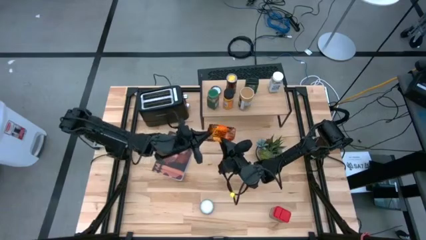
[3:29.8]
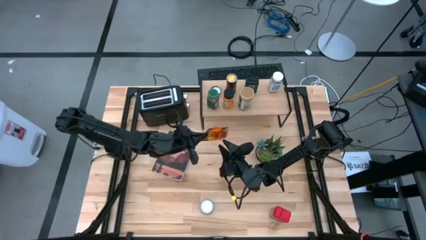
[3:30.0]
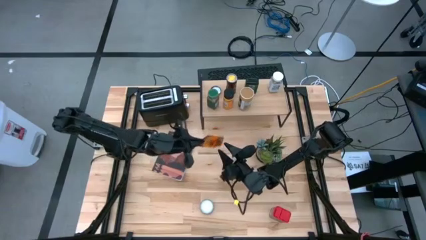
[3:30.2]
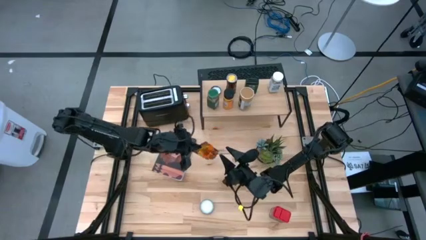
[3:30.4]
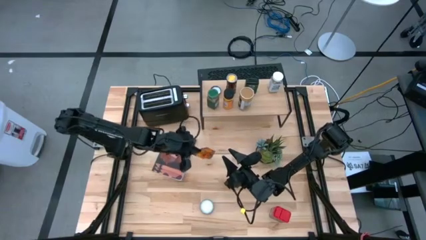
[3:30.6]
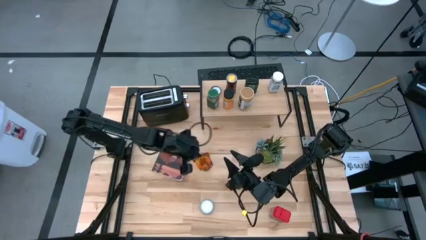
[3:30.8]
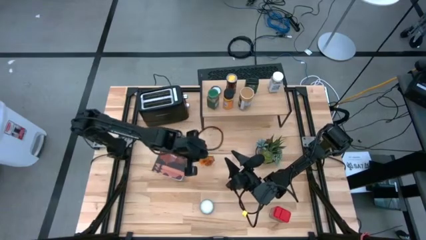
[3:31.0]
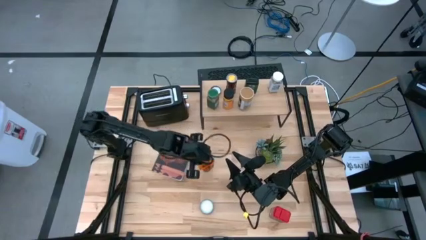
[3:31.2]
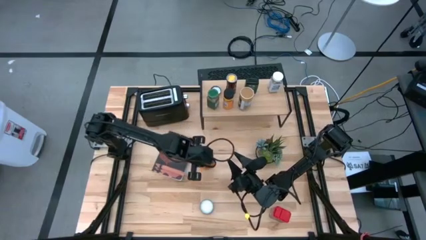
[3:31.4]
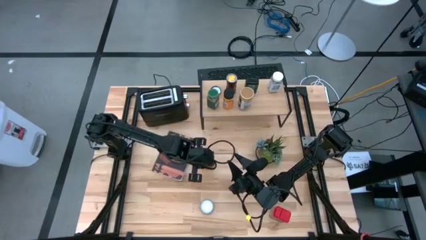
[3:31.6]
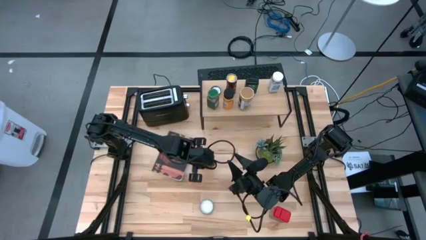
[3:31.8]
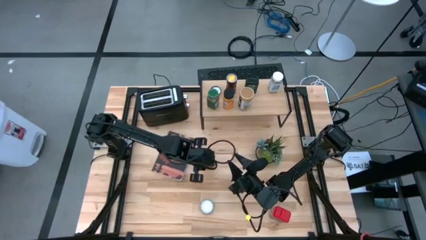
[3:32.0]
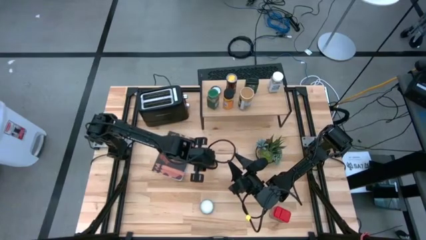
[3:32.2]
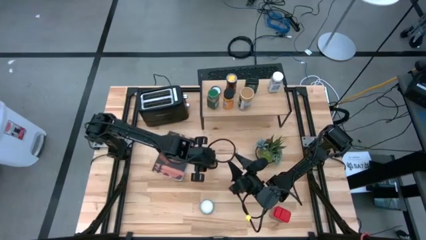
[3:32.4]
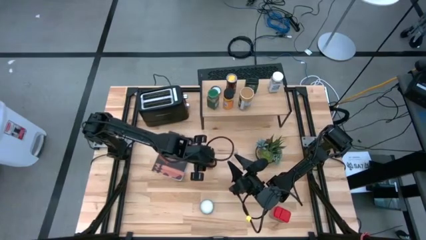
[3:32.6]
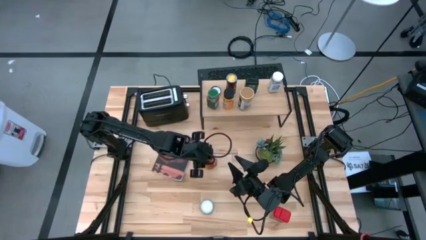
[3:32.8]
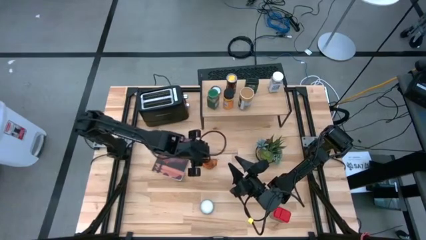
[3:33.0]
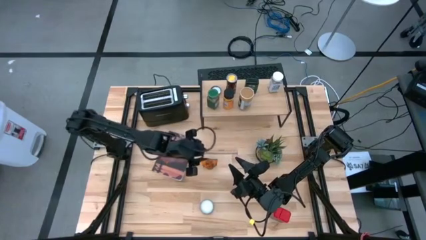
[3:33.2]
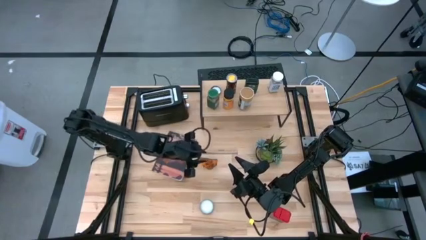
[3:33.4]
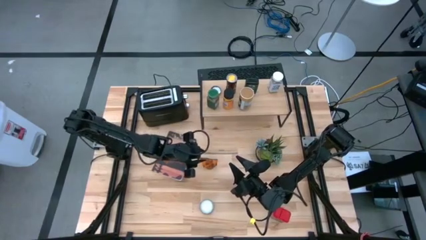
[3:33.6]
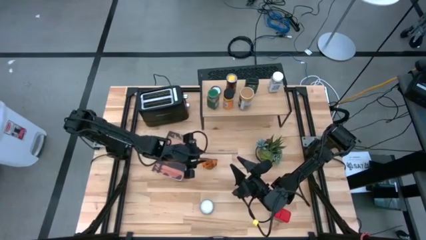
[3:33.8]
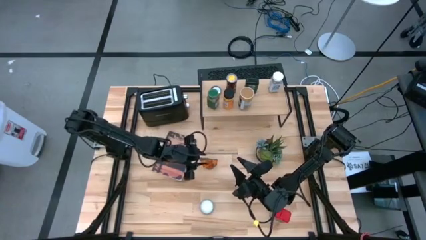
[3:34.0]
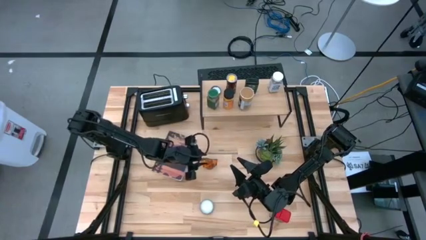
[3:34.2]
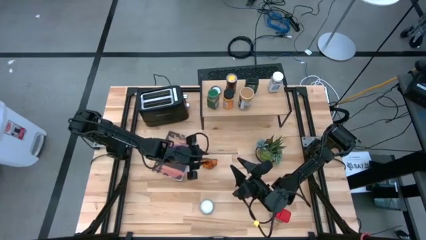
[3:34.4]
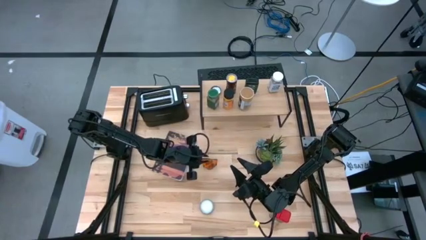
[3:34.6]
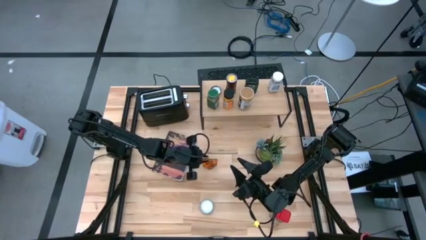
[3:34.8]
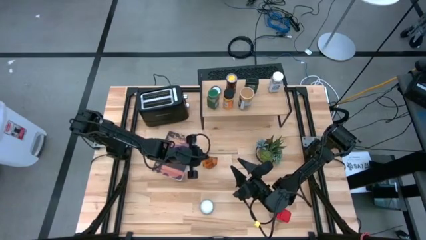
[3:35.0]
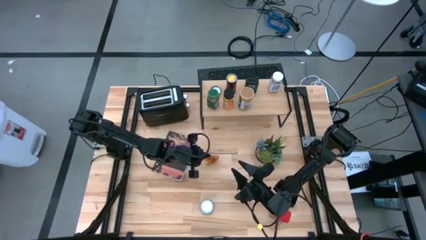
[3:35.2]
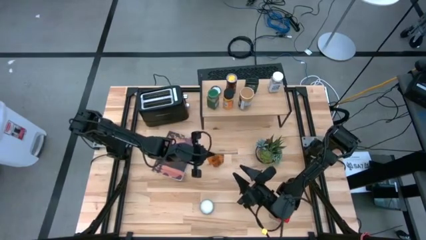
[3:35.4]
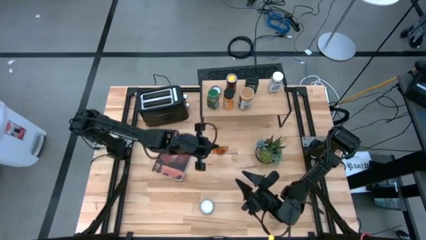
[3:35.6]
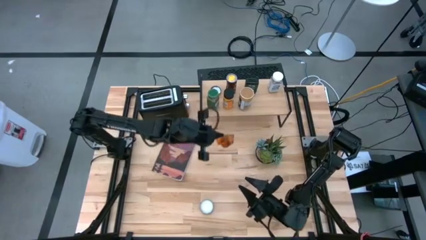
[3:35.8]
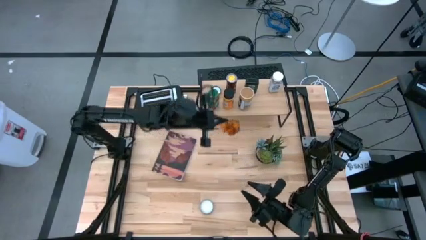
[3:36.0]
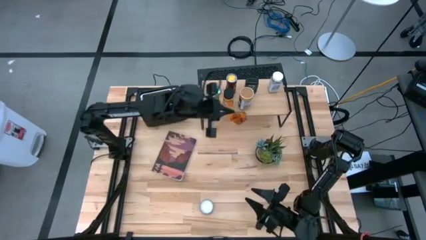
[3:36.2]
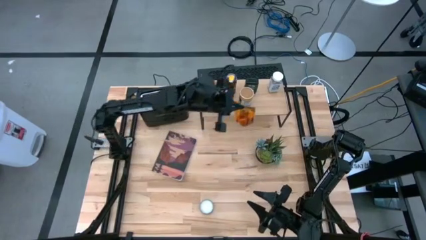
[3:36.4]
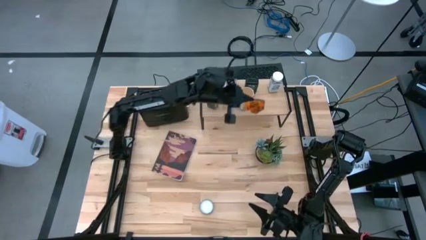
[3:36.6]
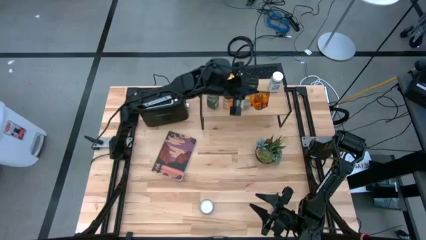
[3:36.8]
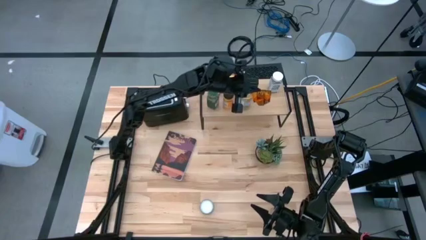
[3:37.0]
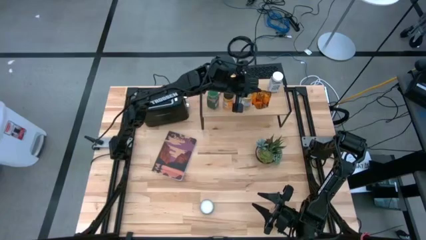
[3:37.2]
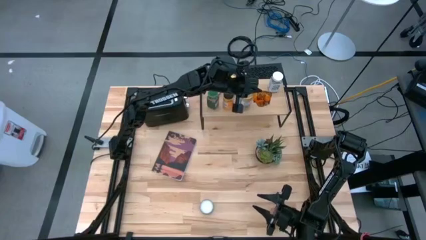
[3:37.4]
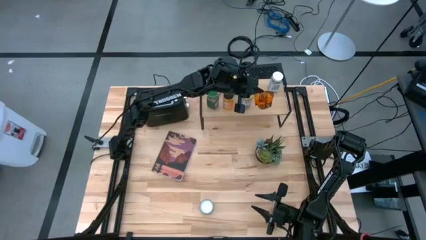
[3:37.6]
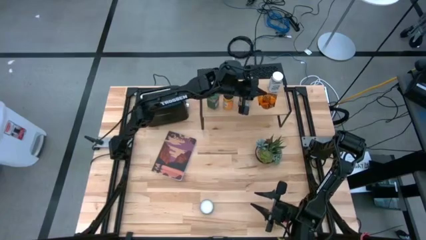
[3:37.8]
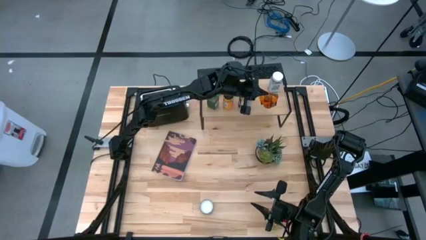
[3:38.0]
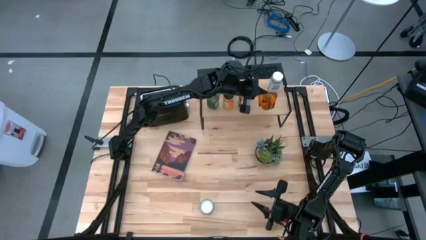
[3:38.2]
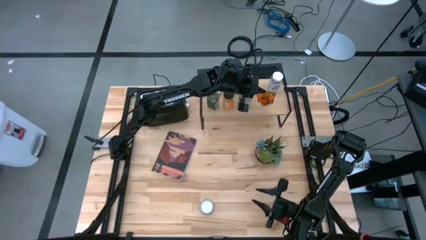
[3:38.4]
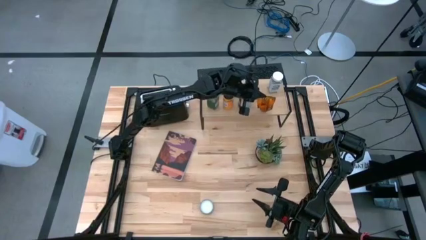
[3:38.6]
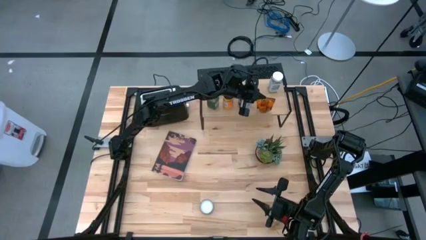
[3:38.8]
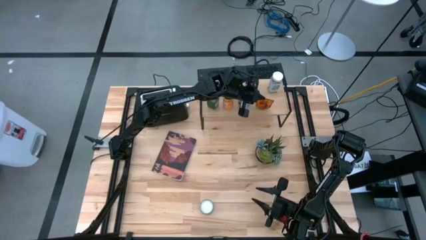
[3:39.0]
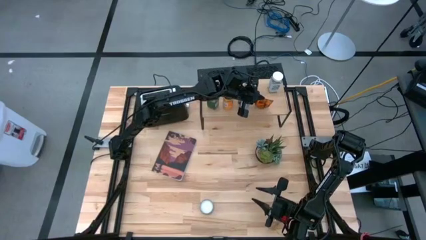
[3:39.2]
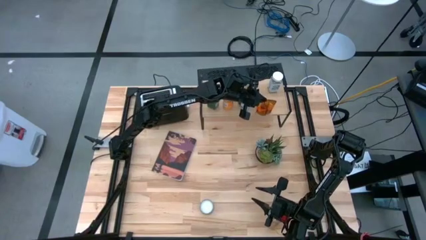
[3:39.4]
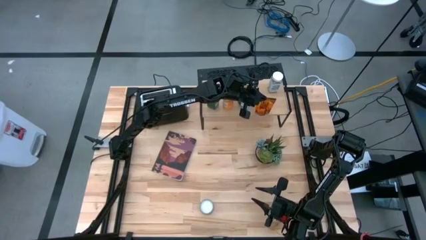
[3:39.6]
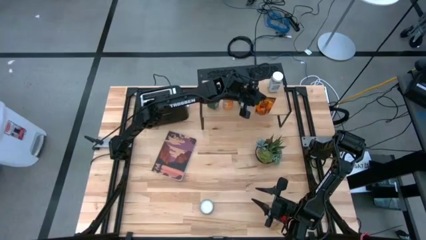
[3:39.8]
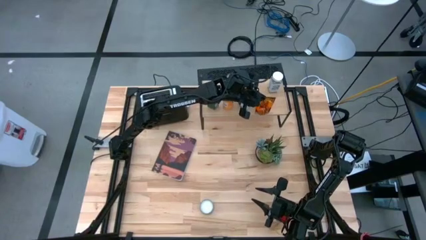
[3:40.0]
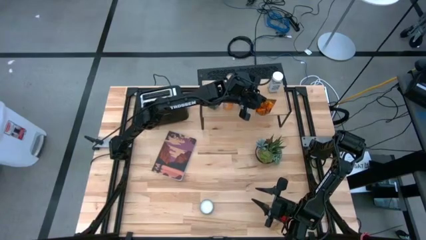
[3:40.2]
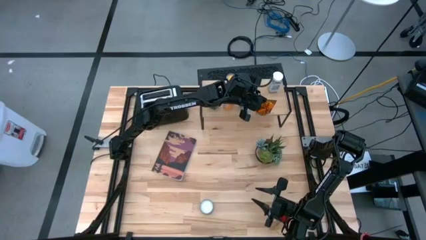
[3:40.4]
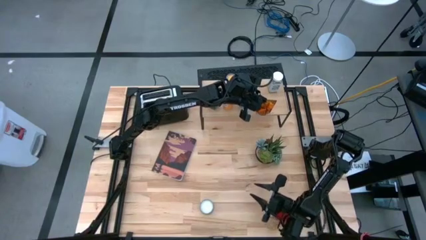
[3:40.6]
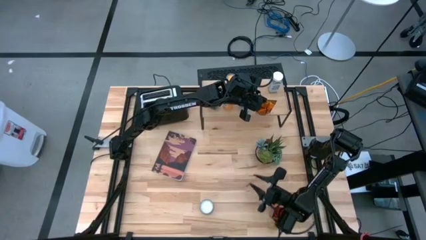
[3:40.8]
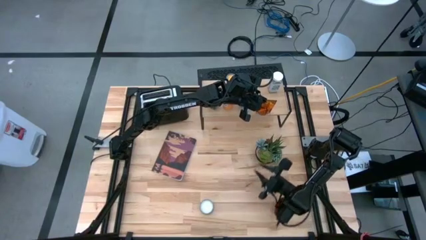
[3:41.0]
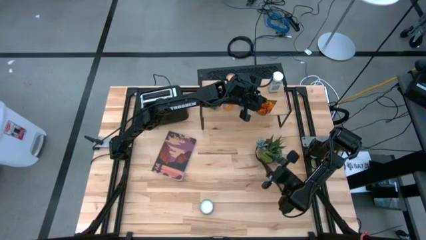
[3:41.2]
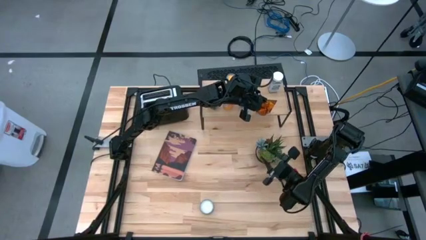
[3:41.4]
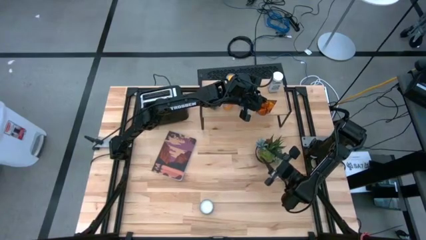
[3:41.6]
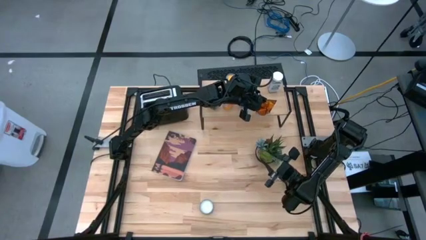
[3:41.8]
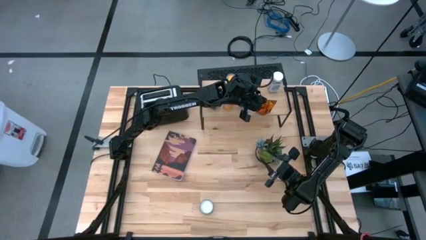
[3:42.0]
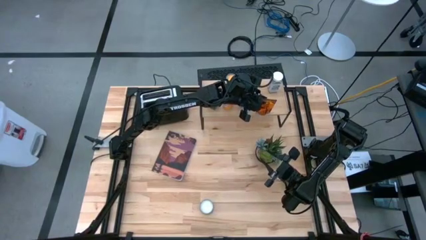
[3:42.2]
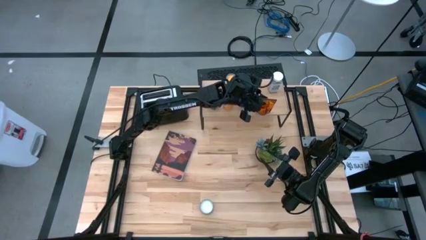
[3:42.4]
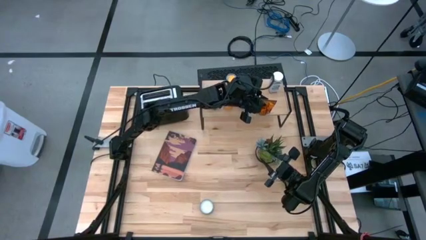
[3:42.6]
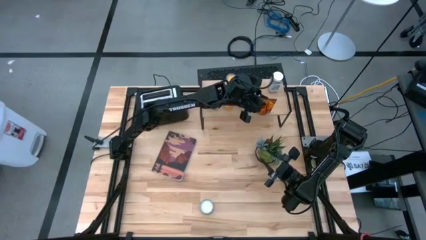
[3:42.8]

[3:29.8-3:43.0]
Task: Shelf spices
Put the orange seasoning pack on the shelf

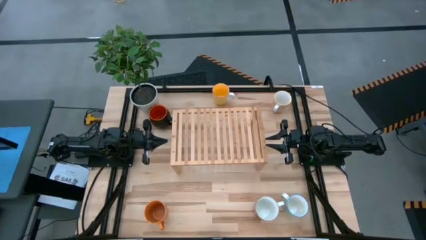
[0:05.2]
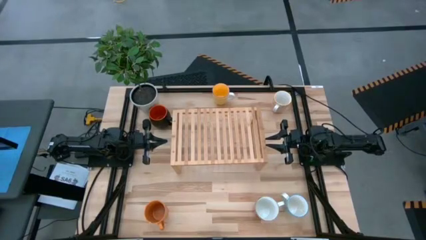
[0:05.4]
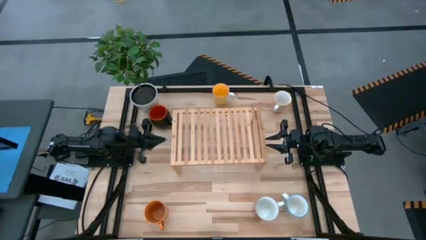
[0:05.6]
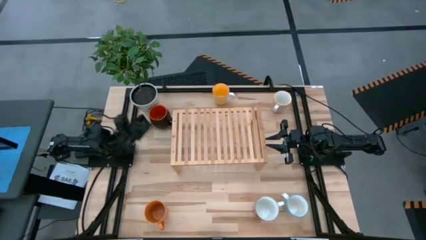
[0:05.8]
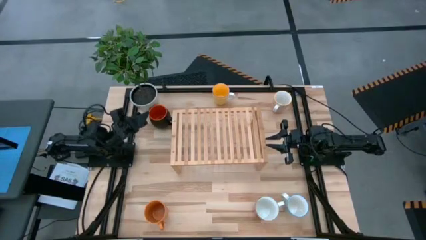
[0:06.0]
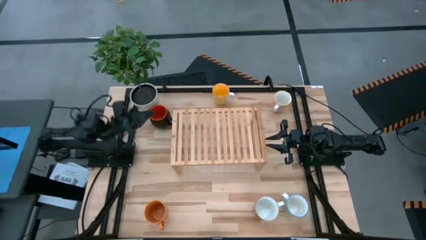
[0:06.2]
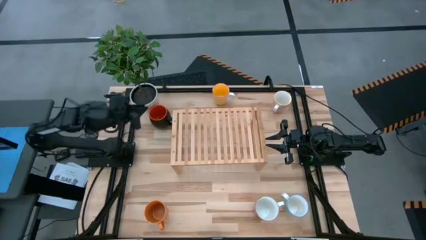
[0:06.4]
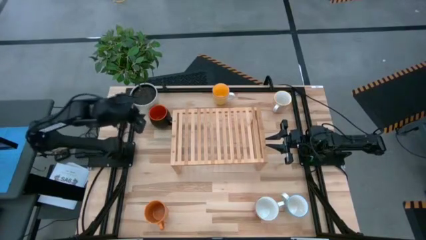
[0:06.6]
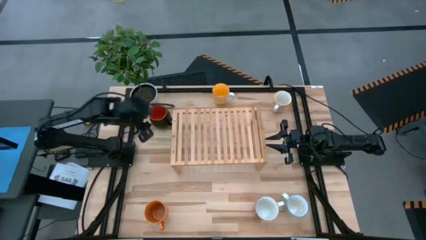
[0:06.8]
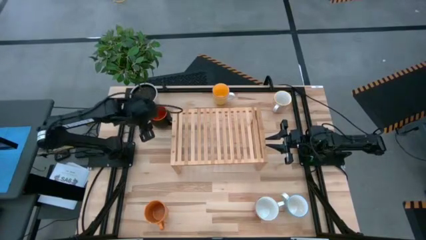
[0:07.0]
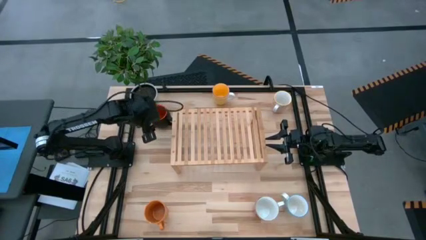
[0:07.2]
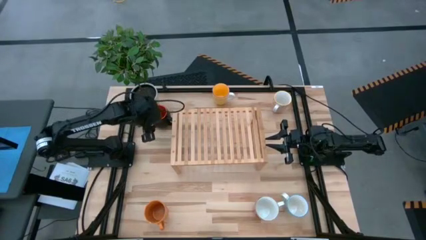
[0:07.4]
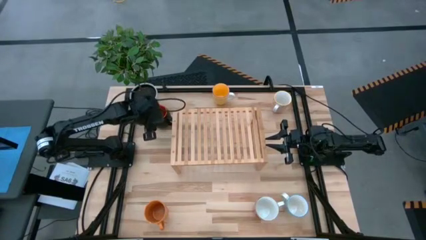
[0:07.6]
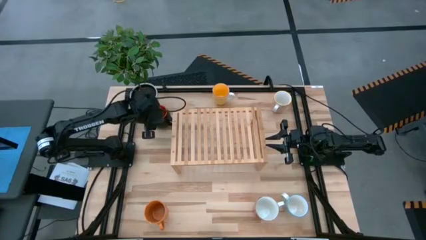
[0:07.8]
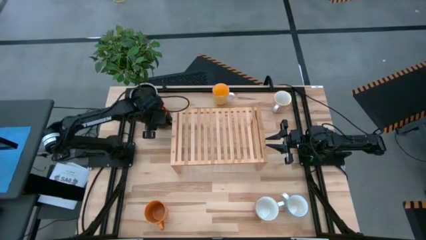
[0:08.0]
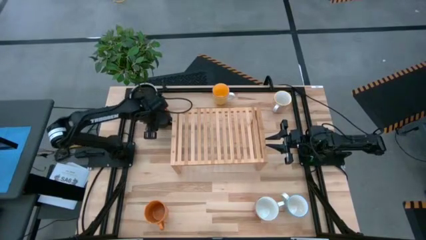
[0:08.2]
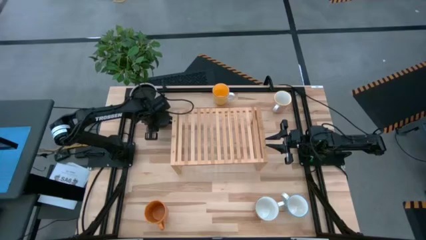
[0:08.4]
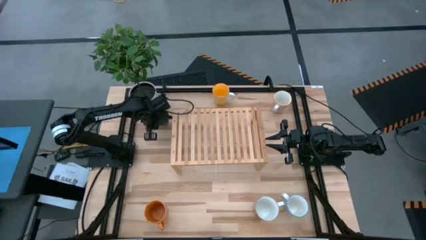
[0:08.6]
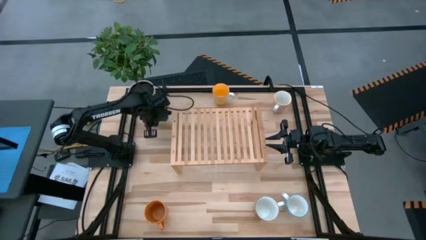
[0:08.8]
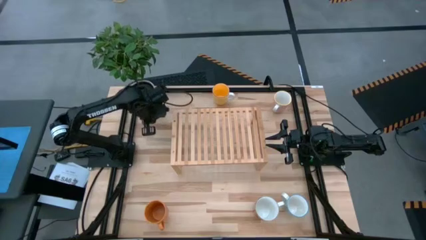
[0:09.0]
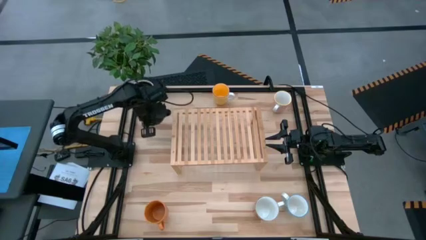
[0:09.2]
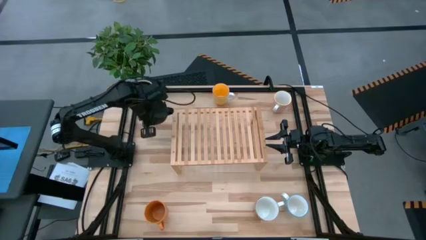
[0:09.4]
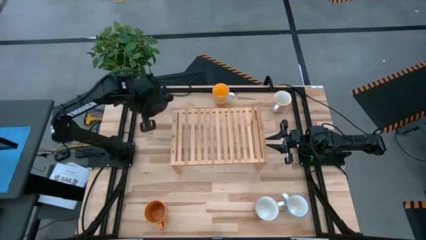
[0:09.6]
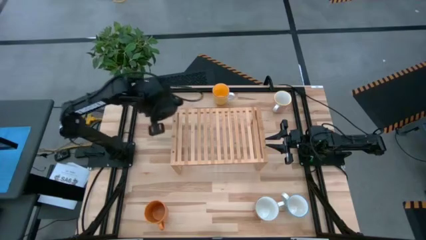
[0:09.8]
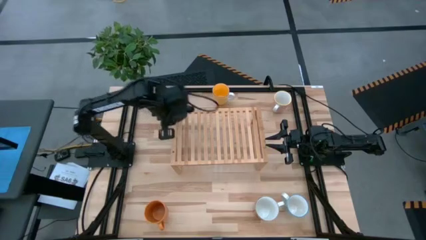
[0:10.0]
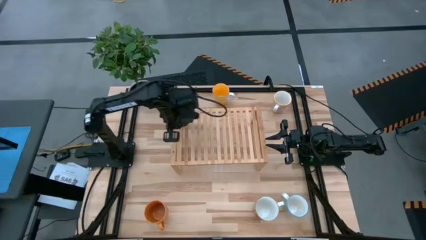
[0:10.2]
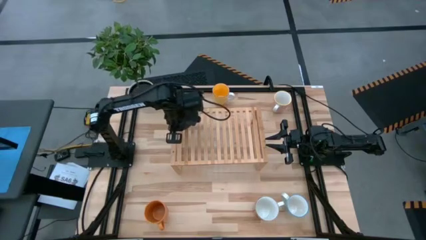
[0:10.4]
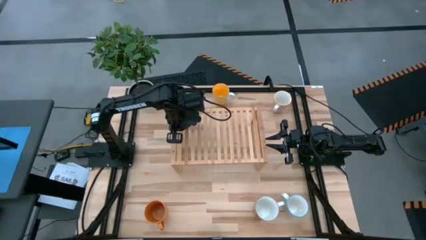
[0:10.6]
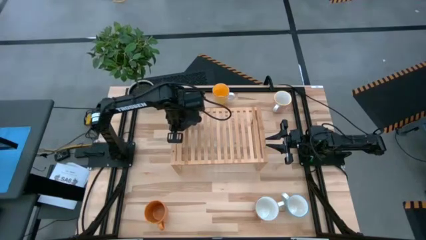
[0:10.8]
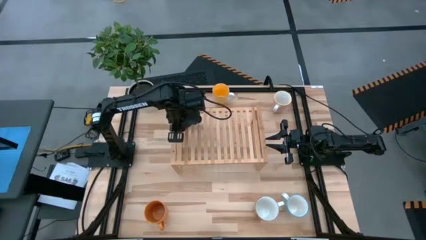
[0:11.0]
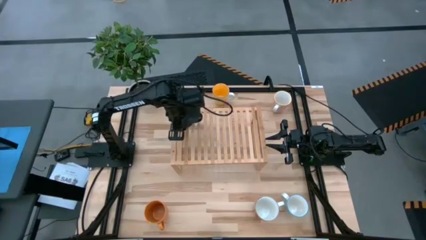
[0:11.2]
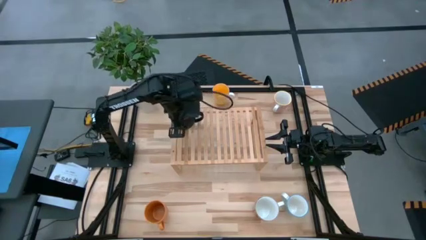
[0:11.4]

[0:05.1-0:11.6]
Task: Place coffee mugs
Put the black mug on the shelf
